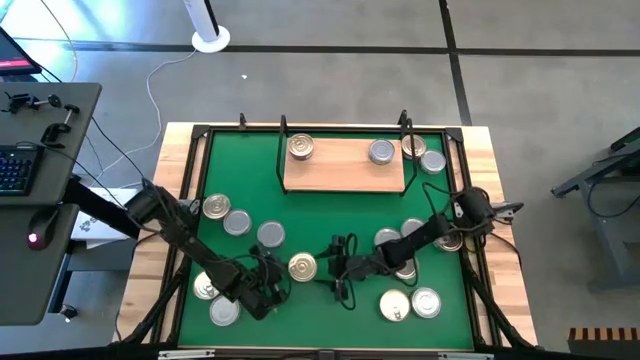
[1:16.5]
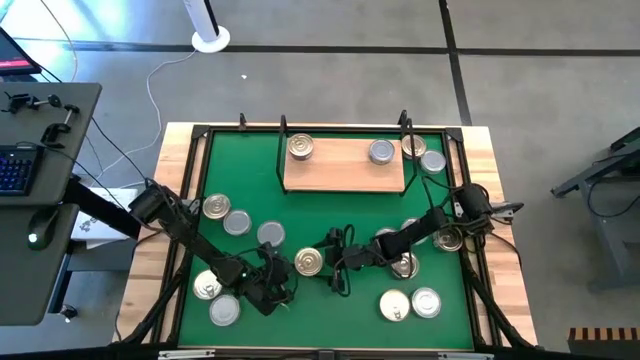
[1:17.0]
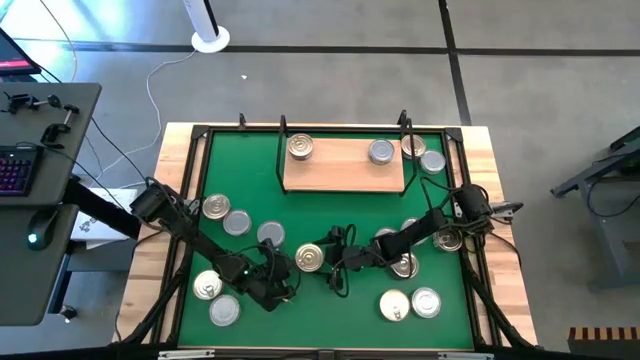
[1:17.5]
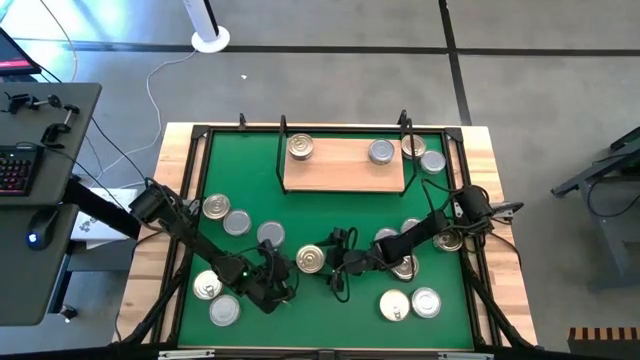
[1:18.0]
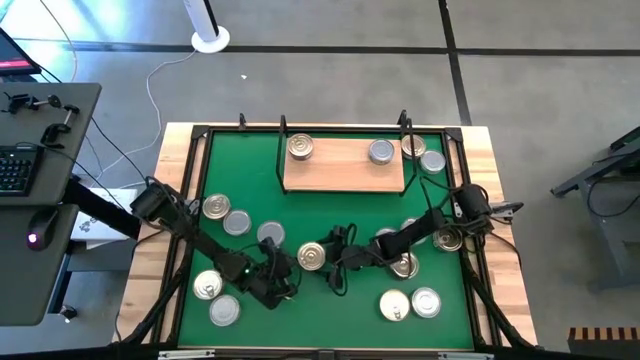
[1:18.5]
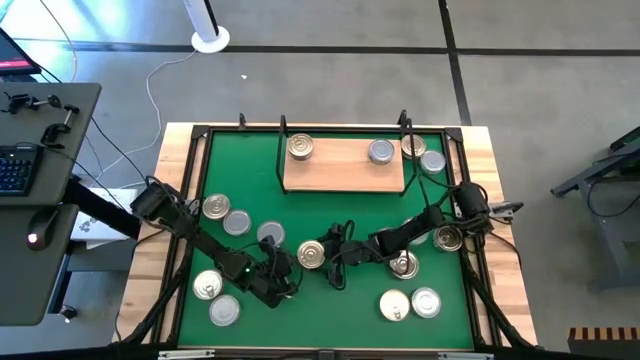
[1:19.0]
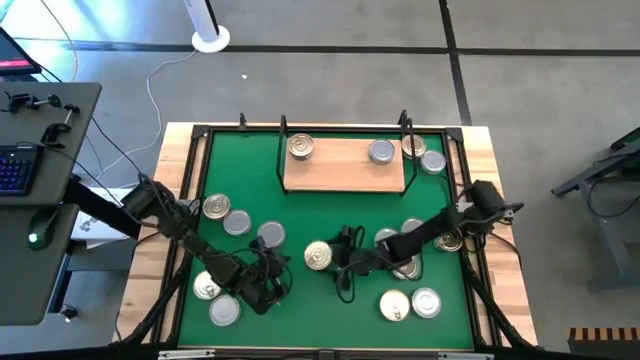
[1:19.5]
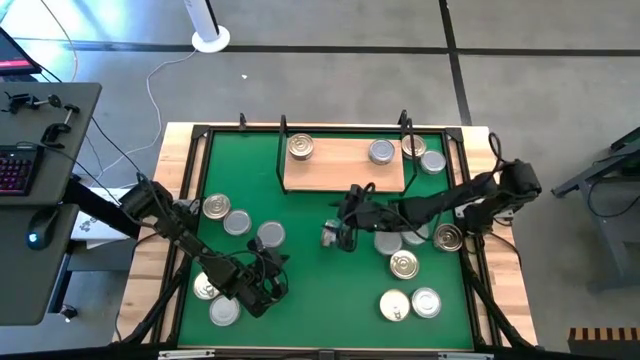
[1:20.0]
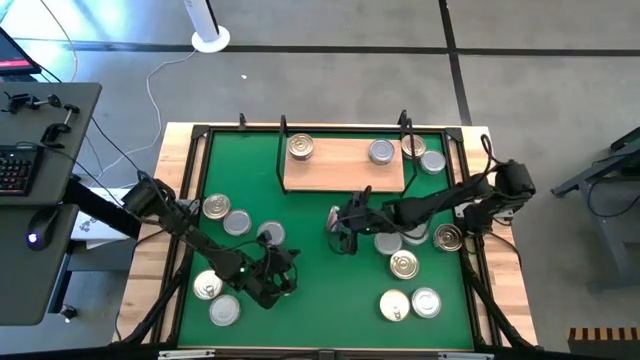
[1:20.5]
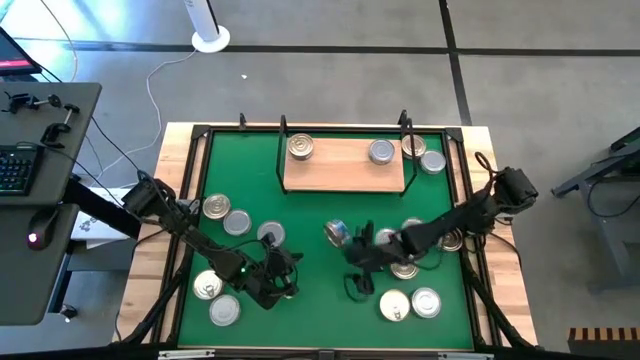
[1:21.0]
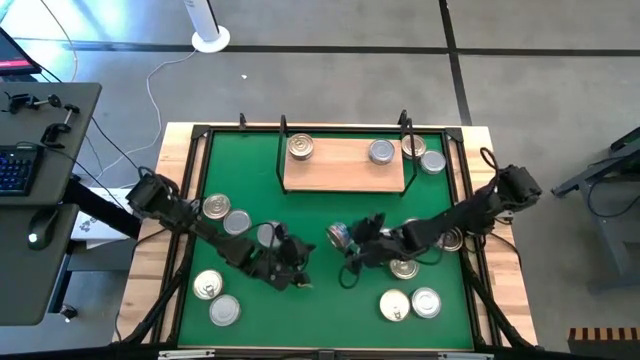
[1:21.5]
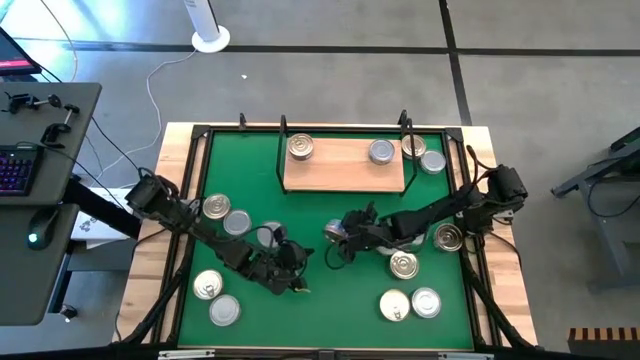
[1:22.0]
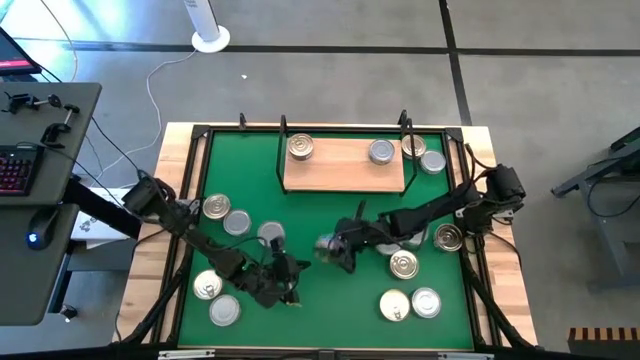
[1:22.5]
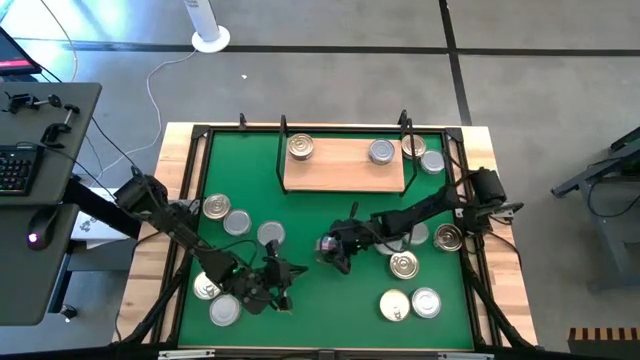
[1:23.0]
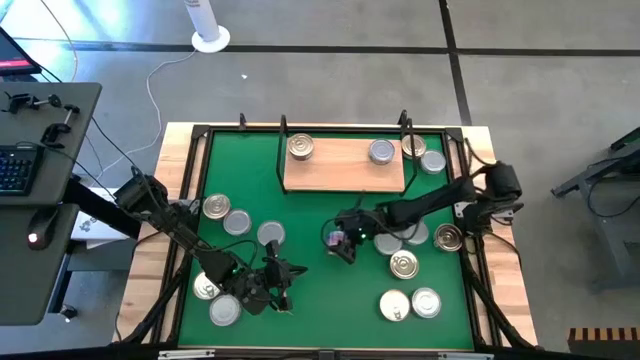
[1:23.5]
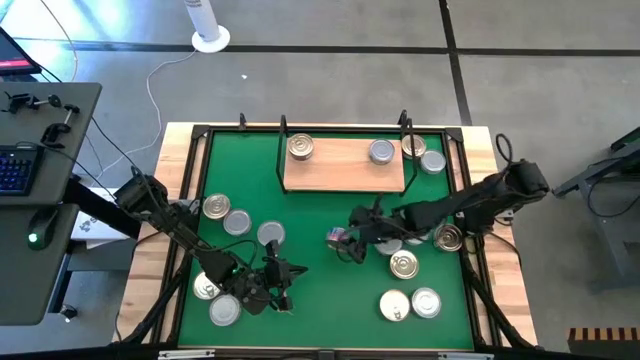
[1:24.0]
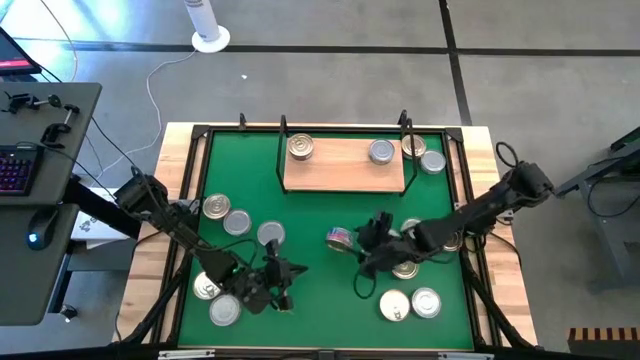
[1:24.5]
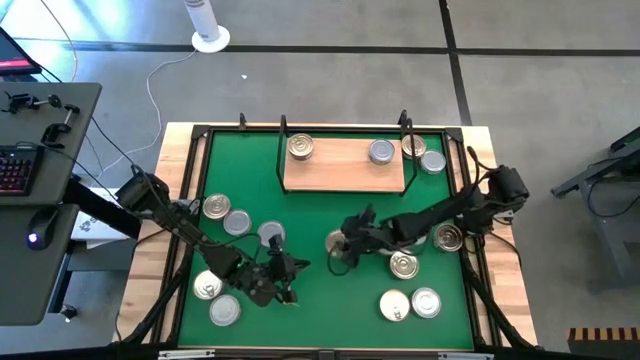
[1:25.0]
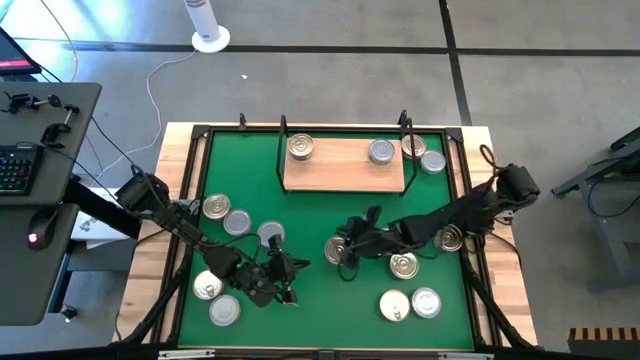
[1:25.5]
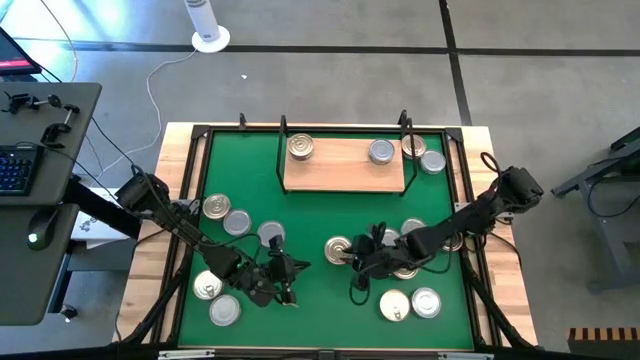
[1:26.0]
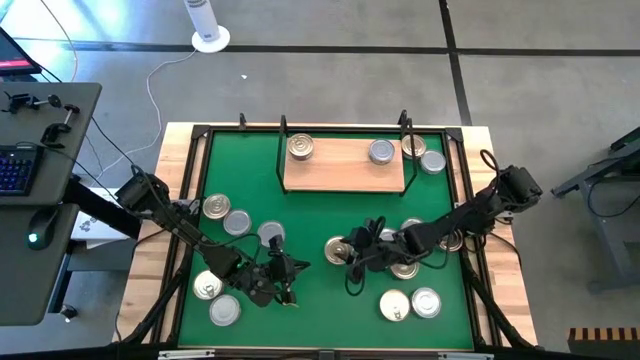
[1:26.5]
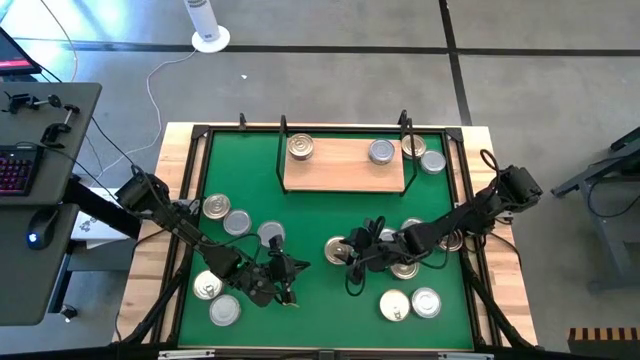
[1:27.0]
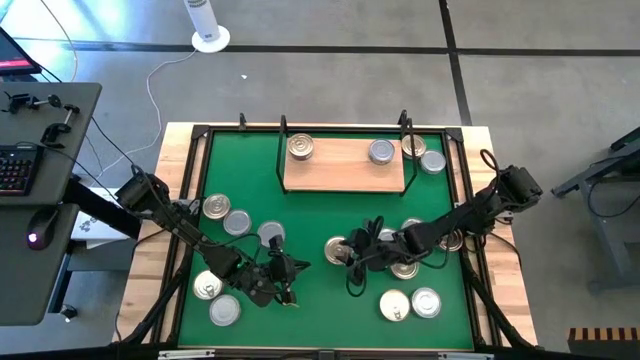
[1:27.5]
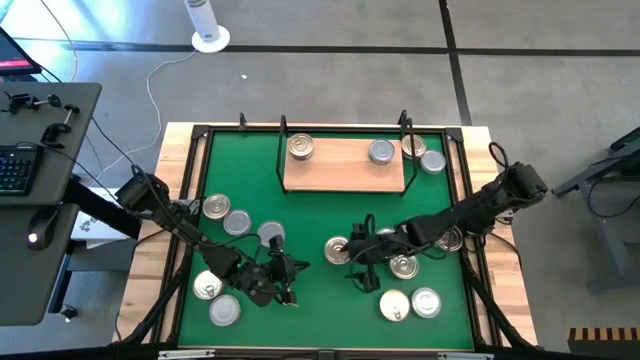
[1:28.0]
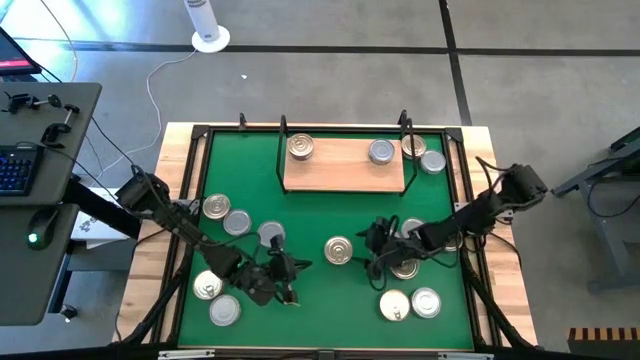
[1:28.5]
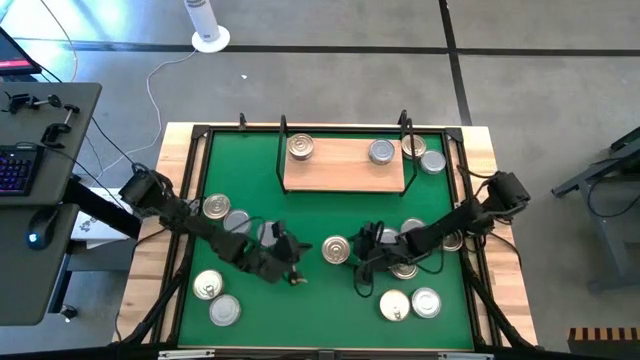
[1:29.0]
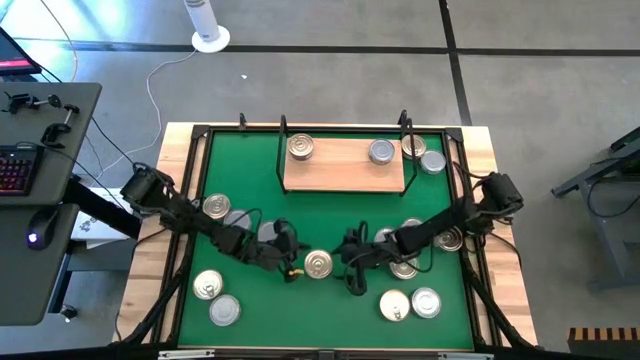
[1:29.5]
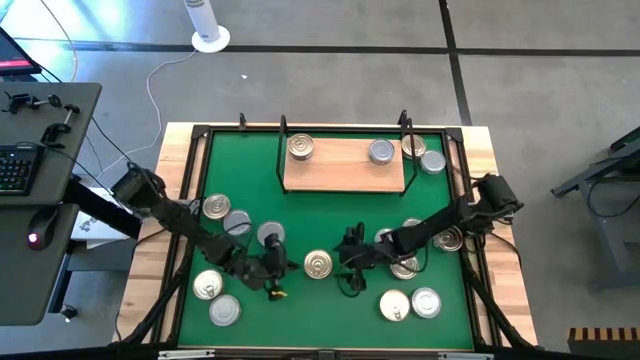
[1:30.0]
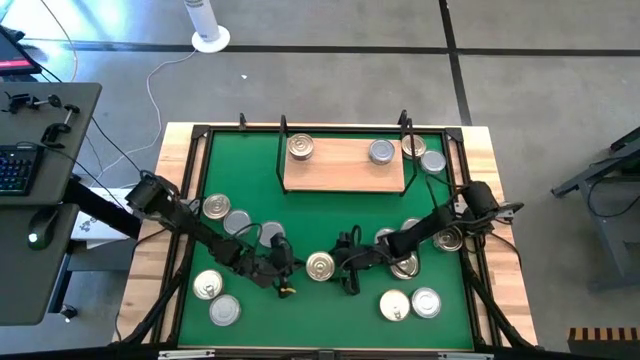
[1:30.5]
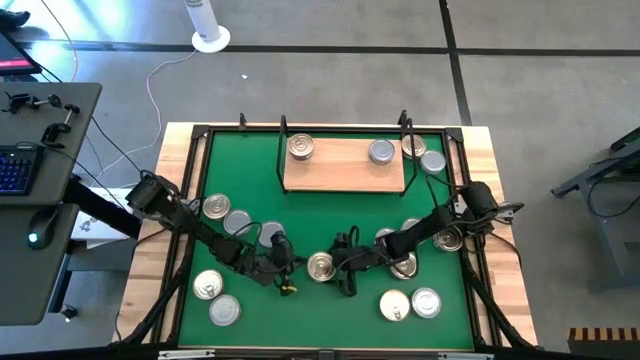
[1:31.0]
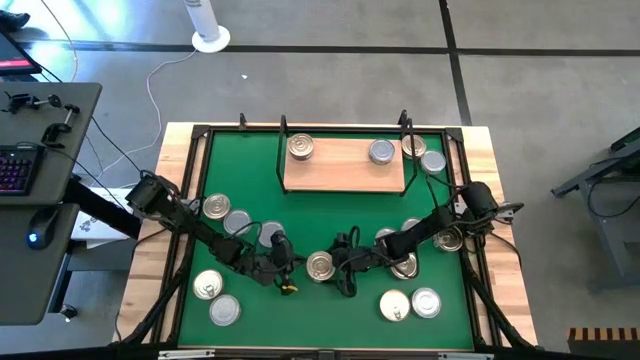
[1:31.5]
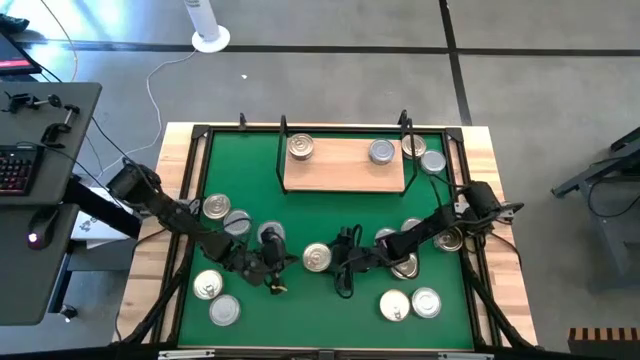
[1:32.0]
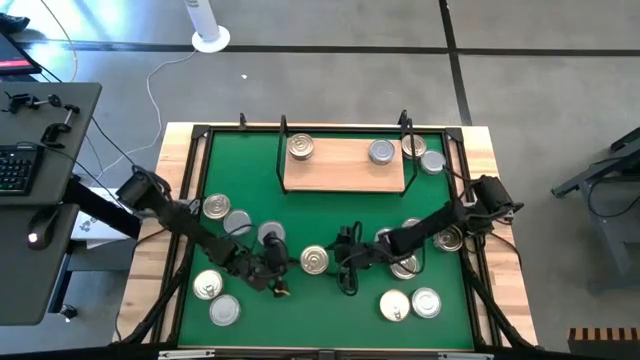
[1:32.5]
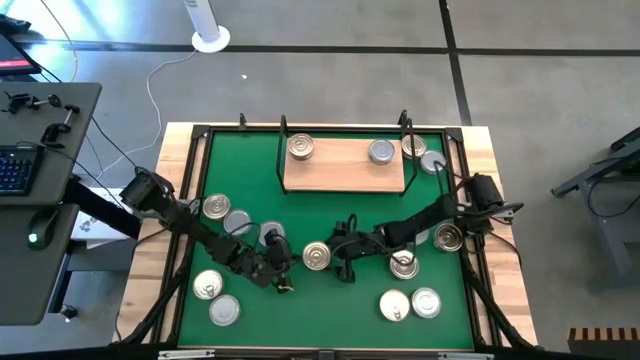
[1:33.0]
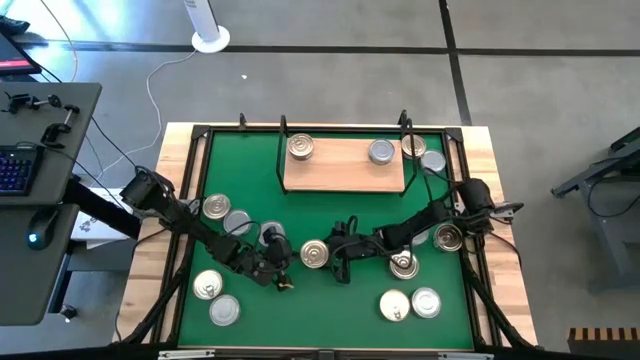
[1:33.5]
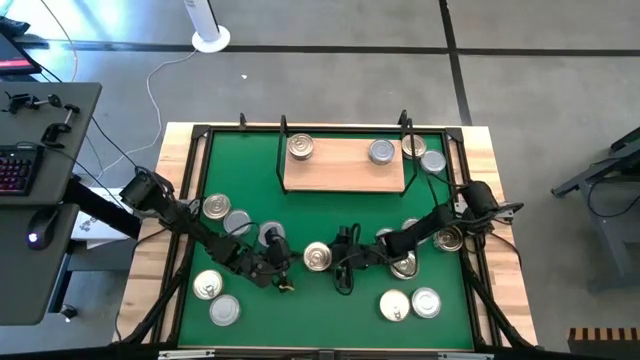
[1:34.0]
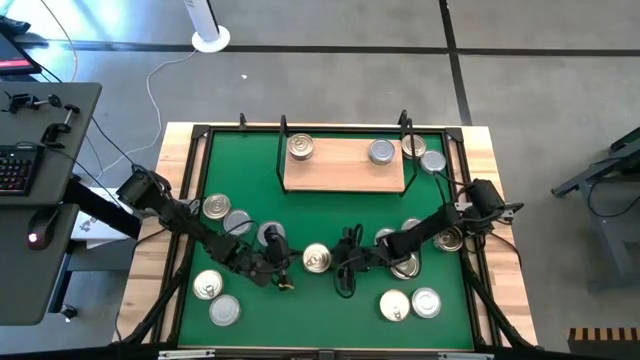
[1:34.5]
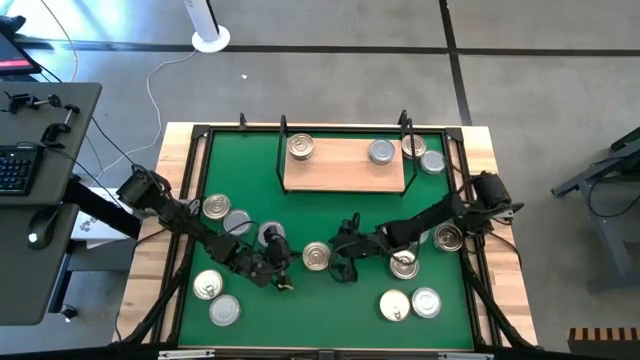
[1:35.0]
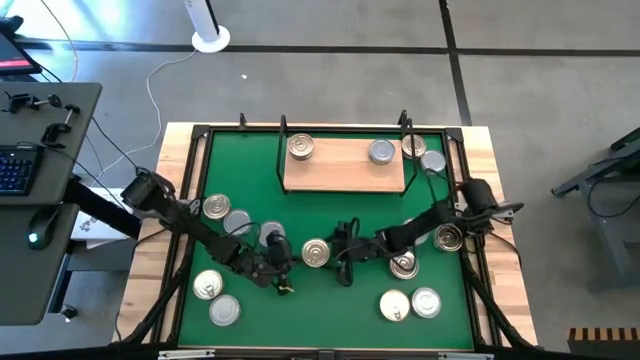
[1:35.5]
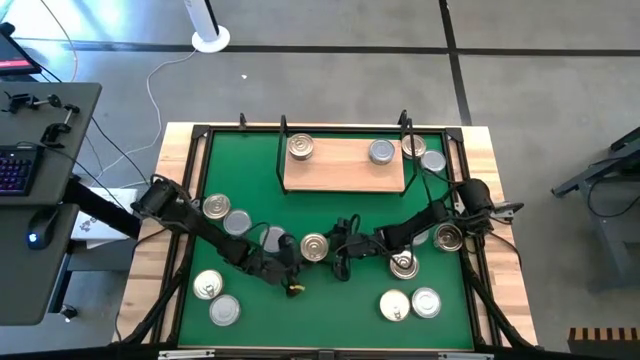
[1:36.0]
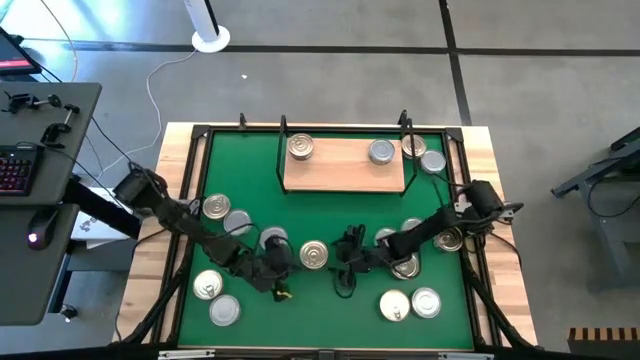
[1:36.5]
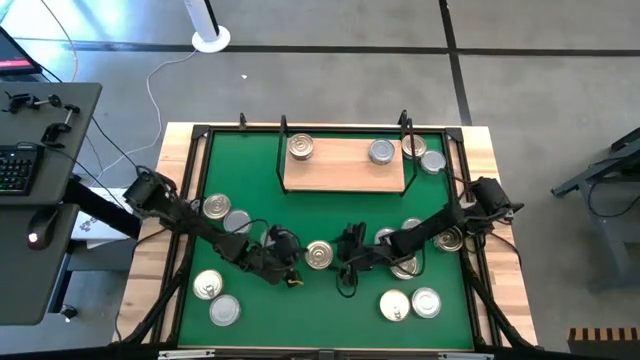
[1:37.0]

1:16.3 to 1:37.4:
Task: Stack canned seafood by type on shelf
Put the blue/pink tuna can on the shelf

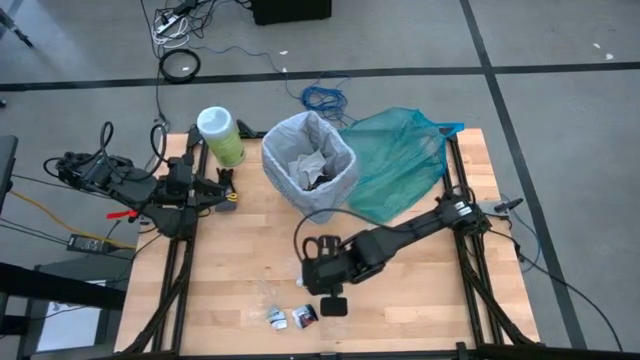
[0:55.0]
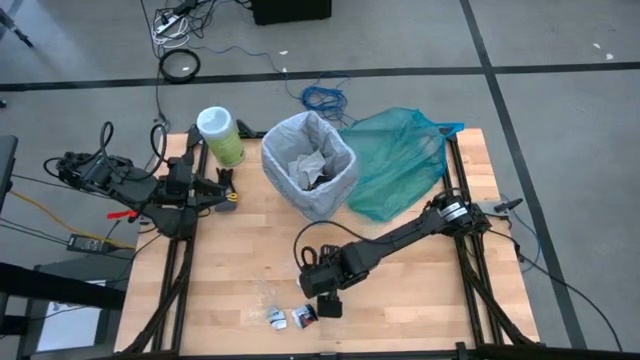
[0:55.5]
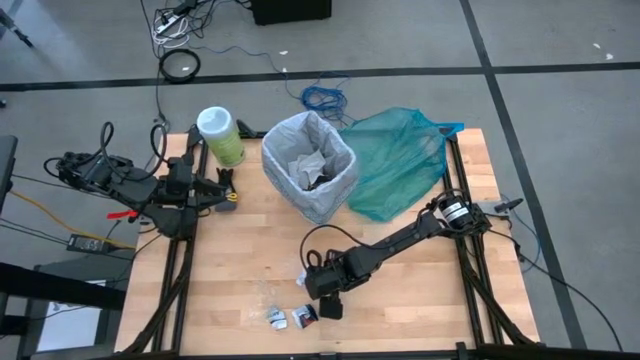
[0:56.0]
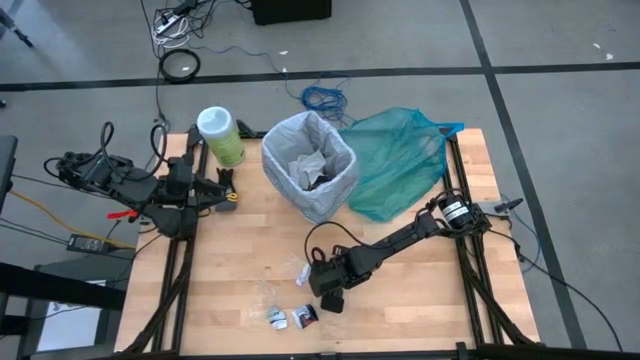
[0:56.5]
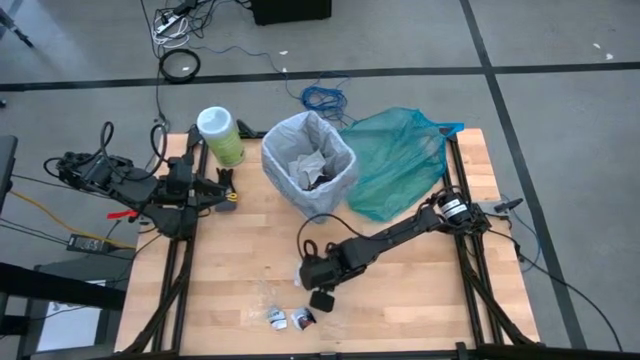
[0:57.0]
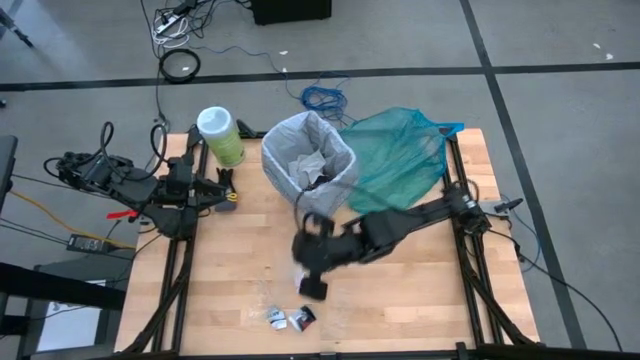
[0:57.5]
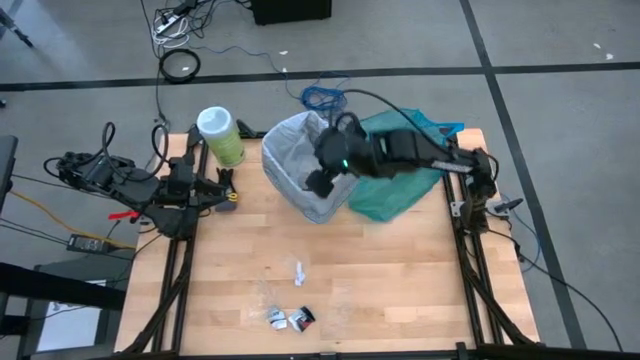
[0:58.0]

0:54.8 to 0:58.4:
Task: place trash/remove bag and relplace
Put the transparent plastic into the trash bin
